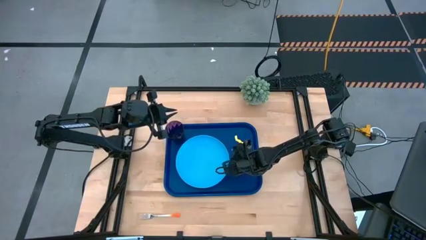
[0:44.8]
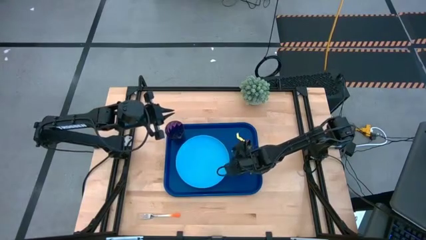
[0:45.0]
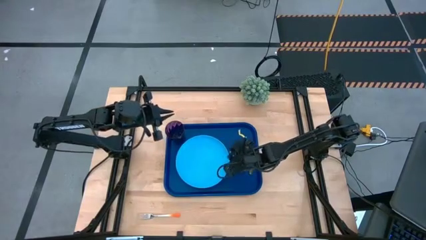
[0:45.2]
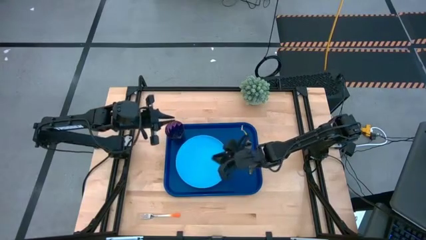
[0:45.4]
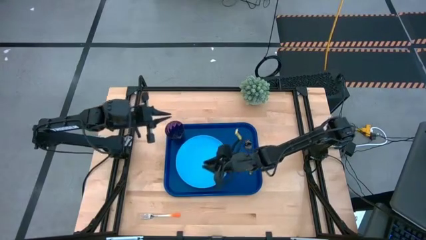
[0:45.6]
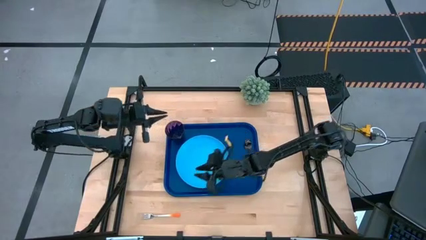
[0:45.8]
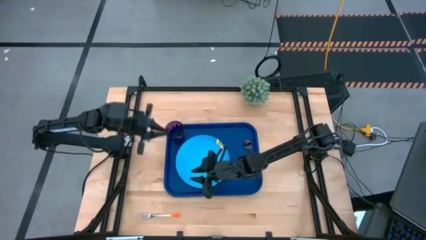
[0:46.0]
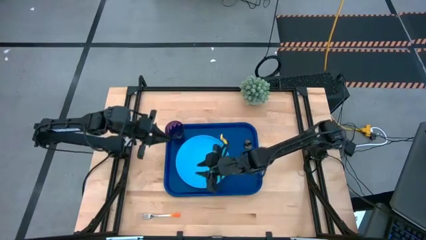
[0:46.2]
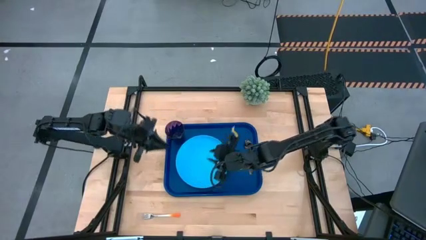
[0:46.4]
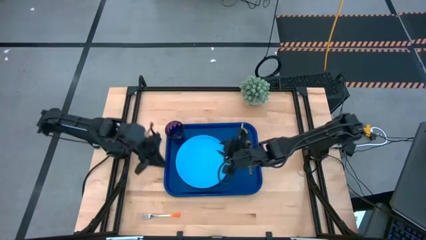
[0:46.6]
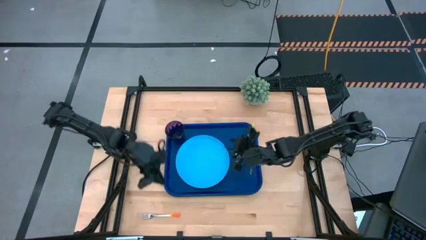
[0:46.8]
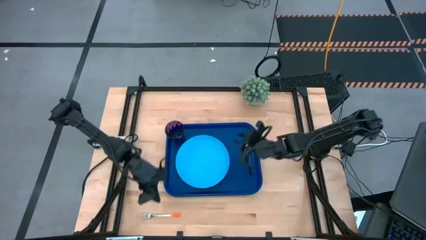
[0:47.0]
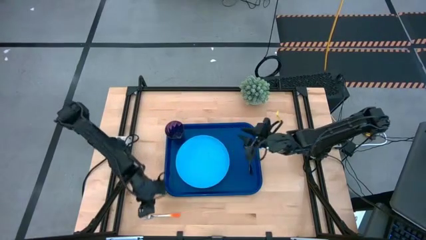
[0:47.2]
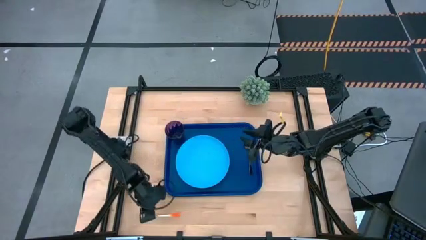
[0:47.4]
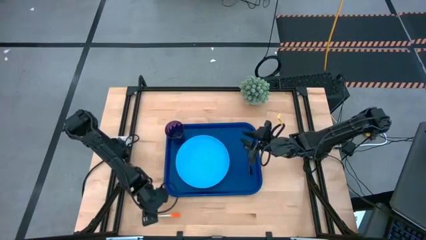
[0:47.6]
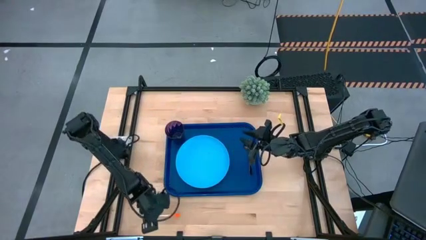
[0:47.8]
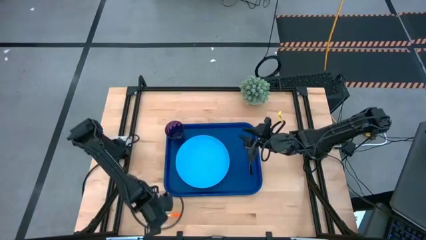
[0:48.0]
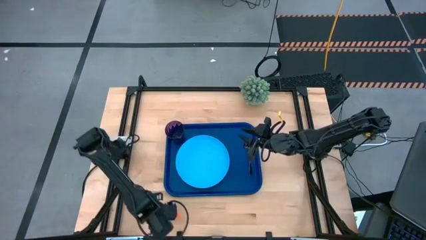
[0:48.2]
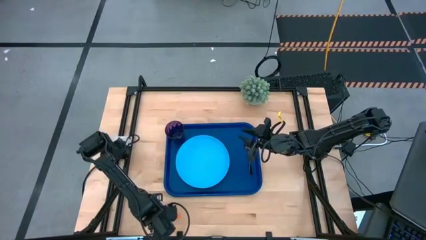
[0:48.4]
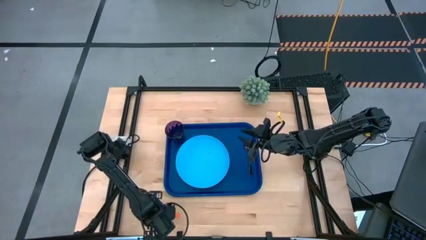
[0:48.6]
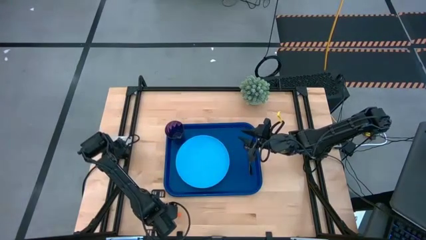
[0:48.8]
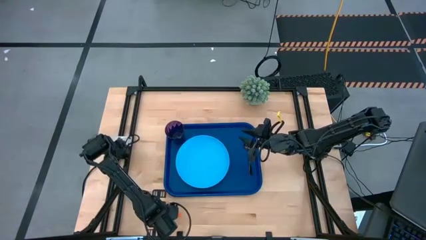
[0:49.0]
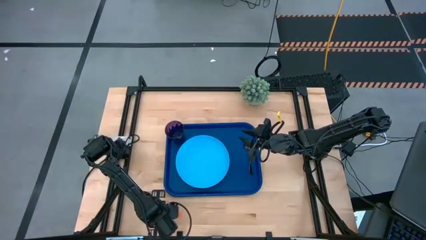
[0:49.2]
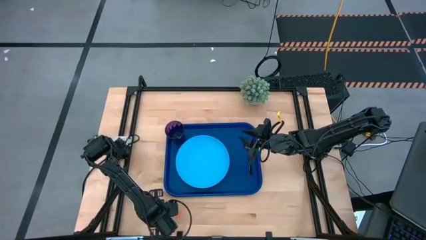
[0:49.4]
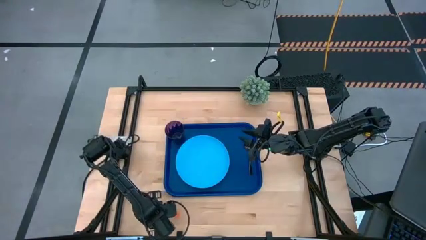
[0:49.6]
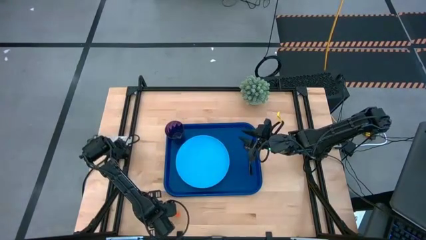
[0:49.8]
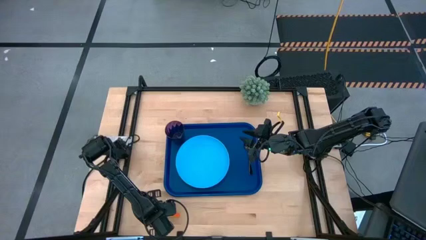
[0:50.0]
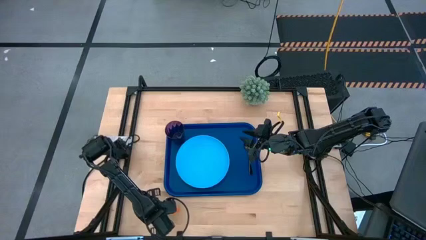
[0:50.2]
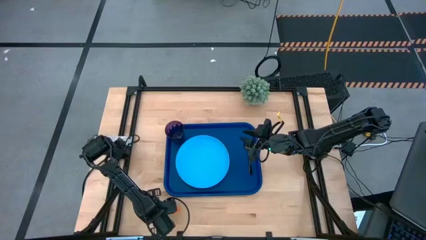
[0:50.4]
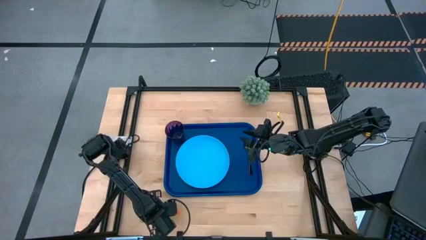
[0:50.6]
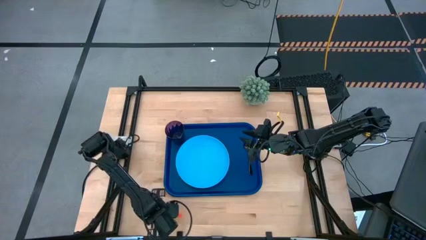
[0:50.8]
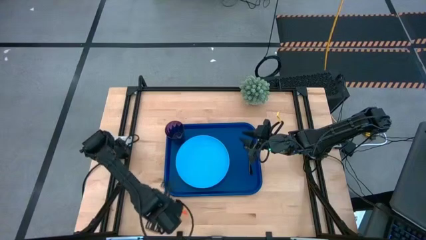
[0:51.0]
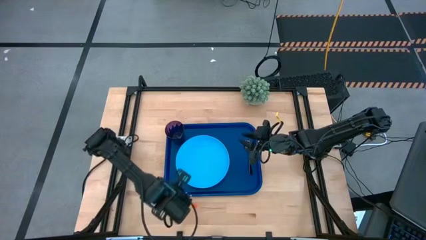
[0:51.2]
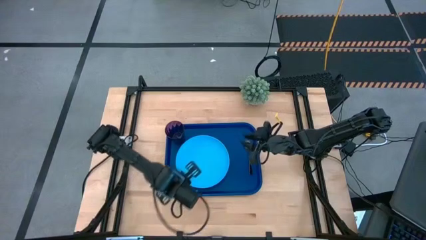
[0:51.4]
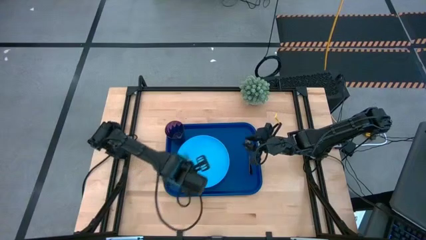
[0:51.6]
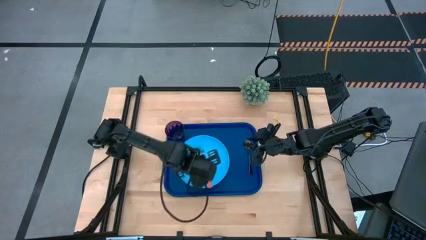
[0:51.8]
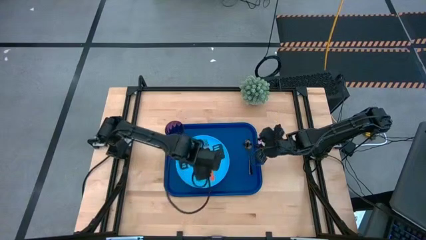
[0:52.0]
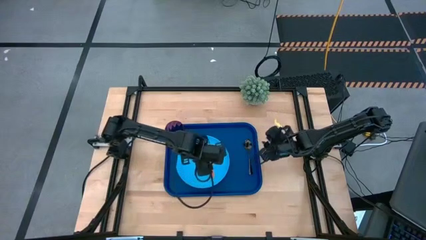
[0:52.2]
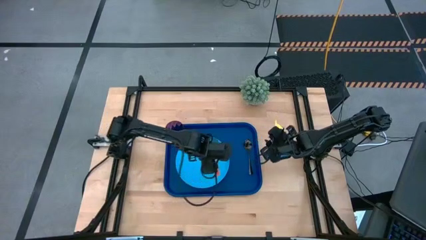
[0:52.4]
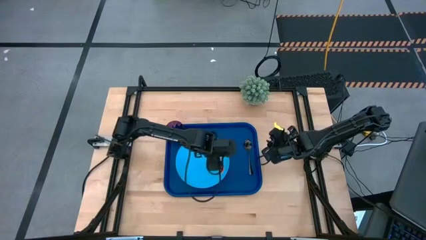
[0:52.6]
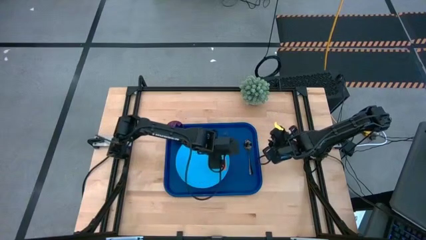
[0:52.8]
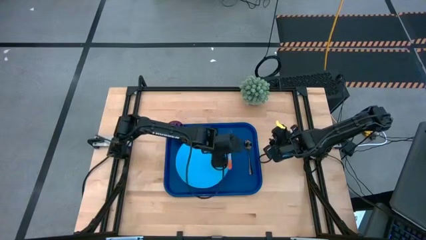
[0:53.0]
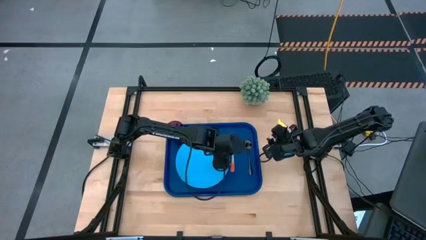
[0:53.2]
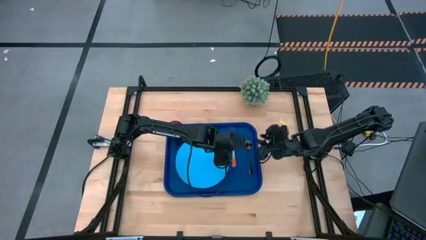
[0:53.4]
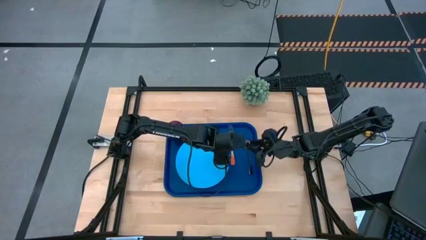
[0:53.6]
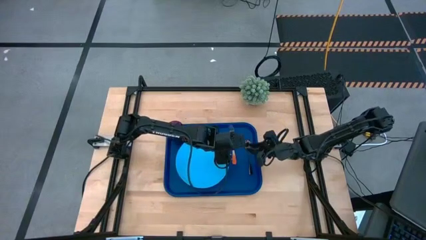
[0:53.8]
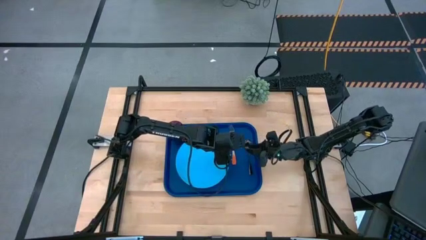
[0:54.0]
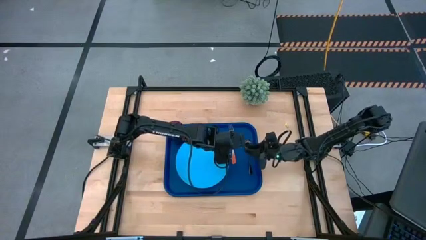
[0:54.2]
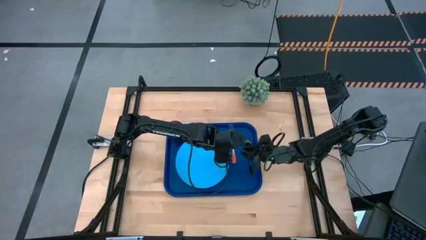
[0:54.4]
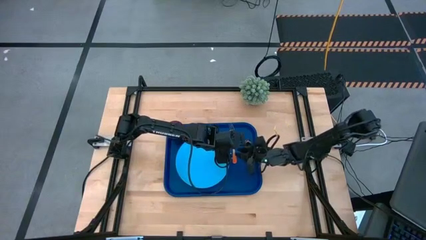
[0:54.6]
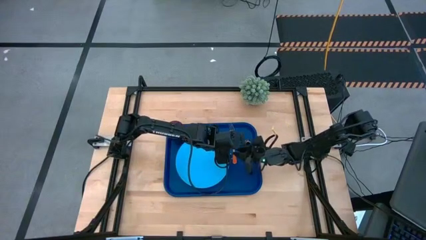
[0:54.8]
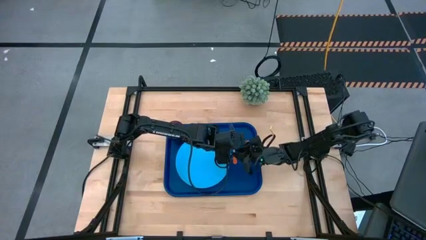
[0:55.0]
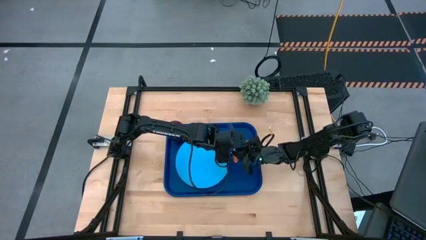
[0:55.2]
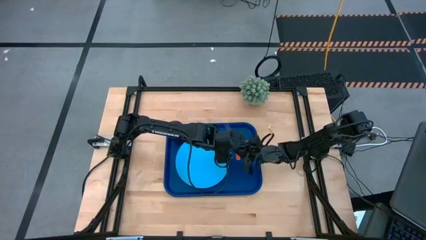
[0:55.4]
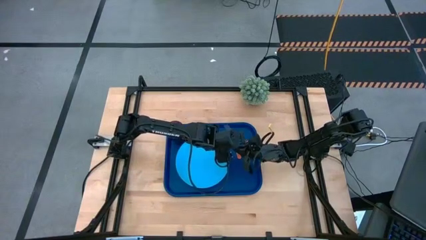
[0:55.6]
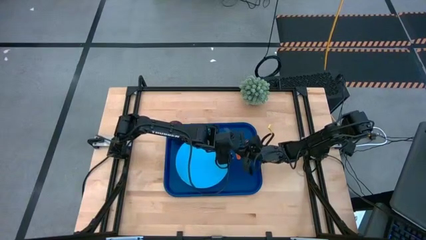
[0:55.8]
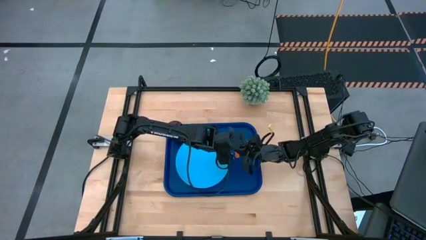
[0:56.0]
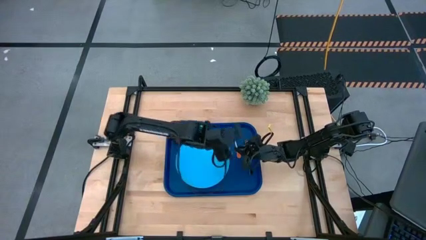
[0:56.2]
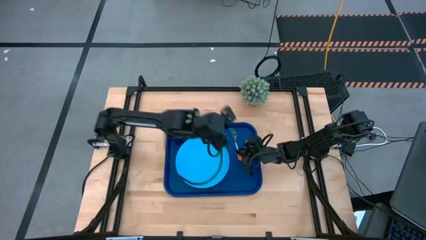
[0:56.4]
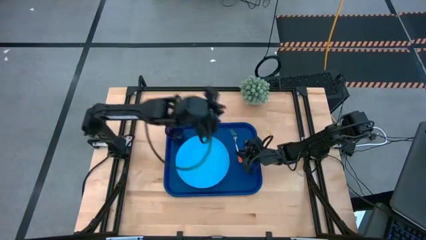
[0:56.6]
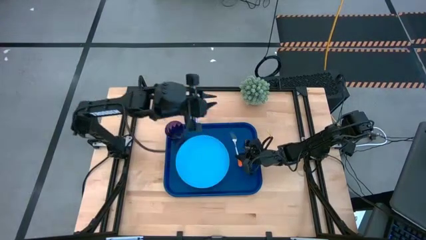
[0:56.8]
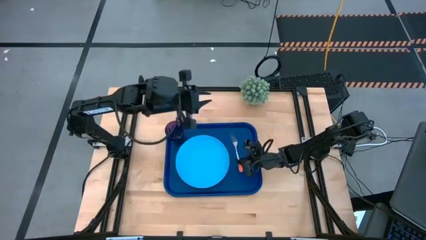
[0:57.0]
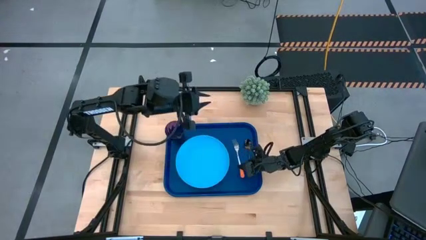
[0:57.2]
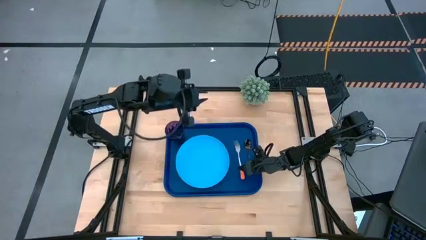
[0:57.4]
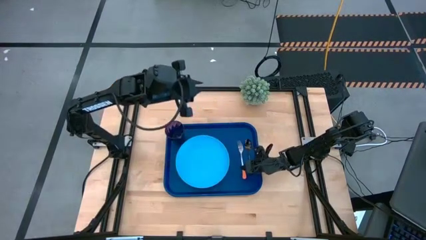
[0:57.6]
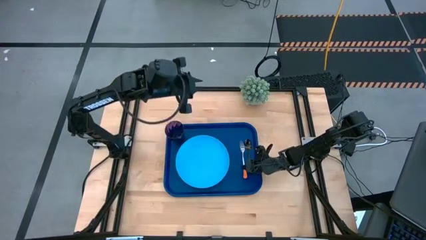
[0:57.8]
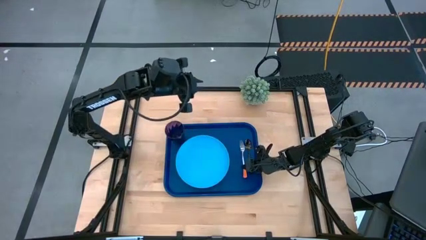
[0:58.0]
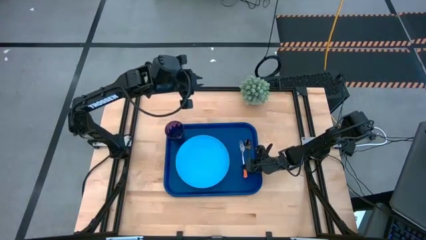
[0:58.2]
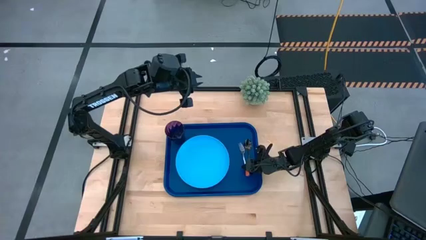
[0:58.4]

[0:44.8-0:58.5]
Task: Pick and place plate/cup/fork/spoon on tray
Put the orange fork in the middle of the light blue plate and black spoon on the dark blue tray
